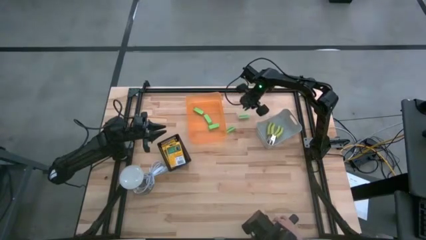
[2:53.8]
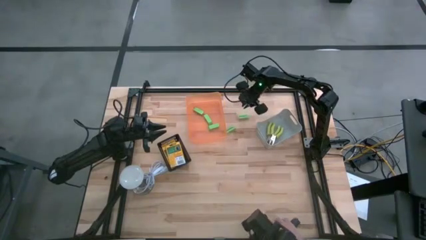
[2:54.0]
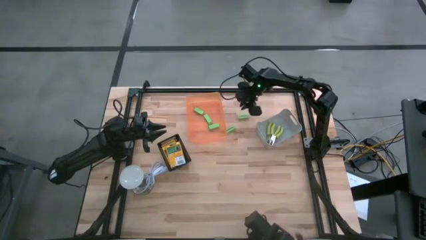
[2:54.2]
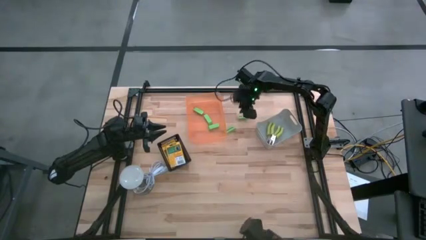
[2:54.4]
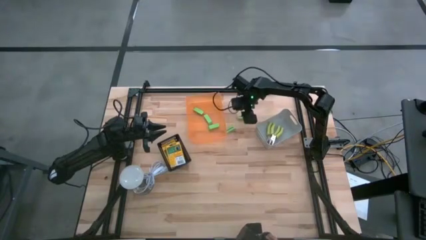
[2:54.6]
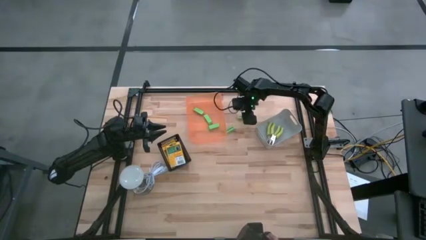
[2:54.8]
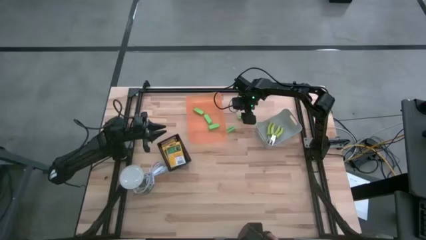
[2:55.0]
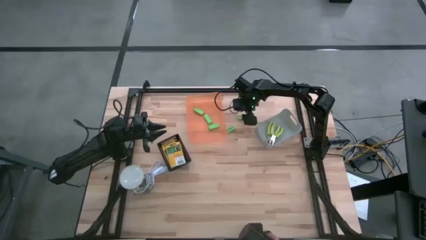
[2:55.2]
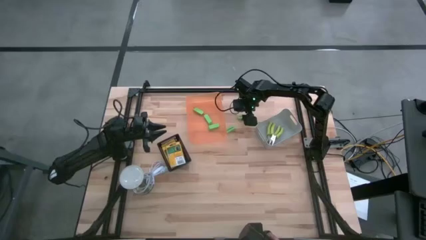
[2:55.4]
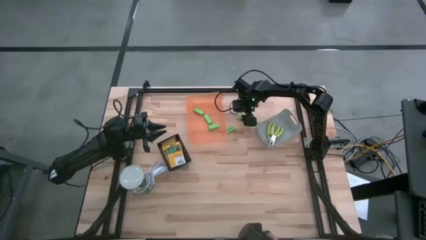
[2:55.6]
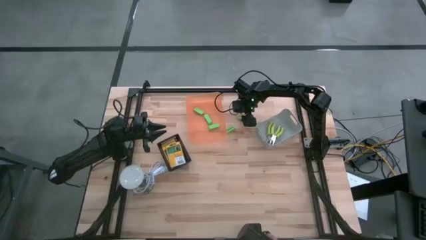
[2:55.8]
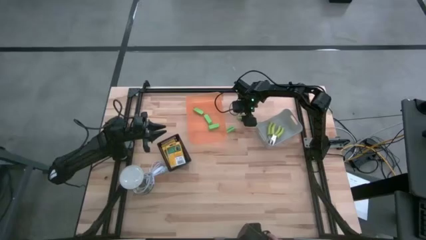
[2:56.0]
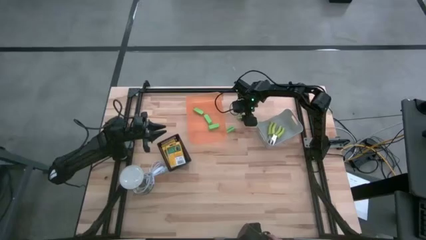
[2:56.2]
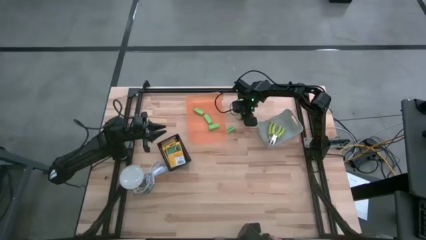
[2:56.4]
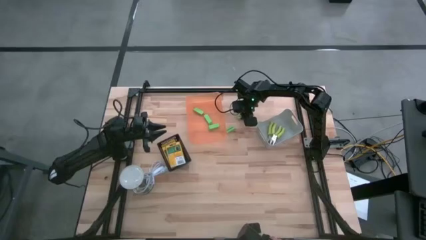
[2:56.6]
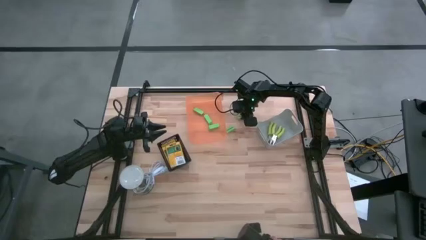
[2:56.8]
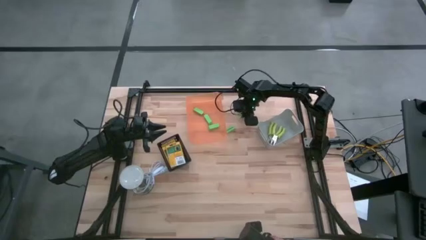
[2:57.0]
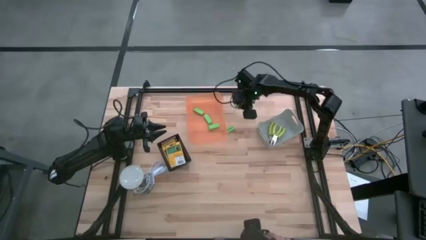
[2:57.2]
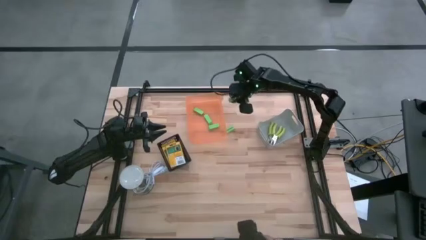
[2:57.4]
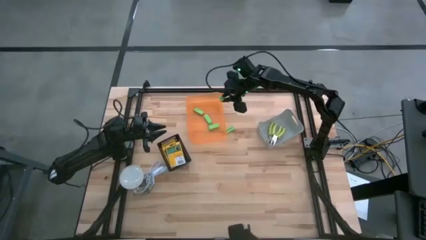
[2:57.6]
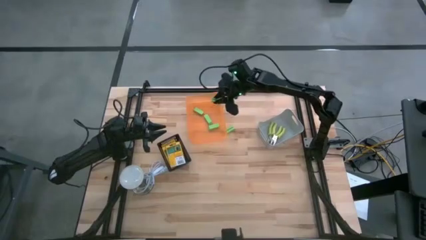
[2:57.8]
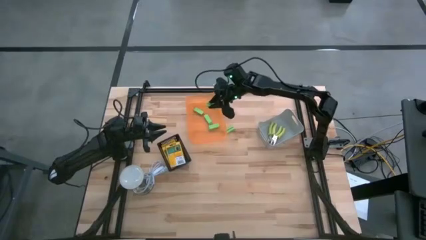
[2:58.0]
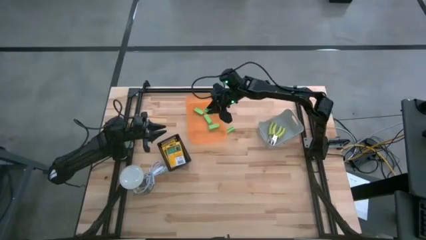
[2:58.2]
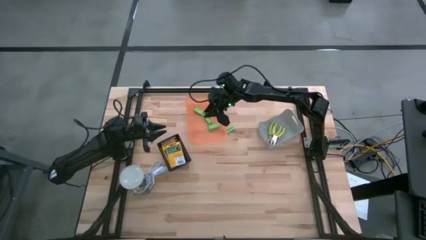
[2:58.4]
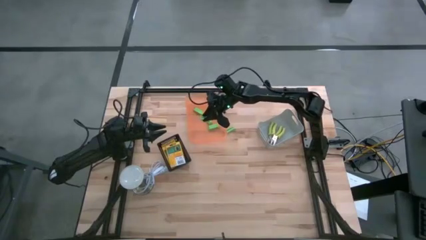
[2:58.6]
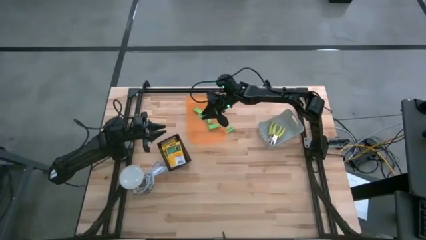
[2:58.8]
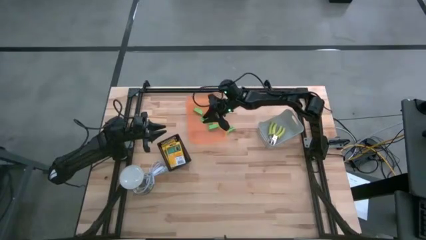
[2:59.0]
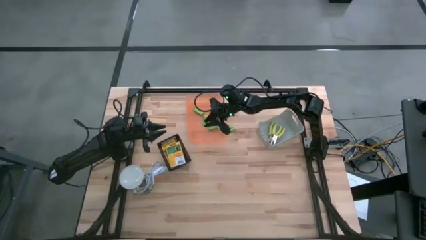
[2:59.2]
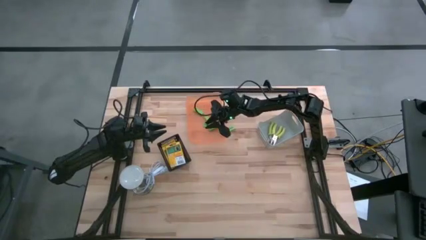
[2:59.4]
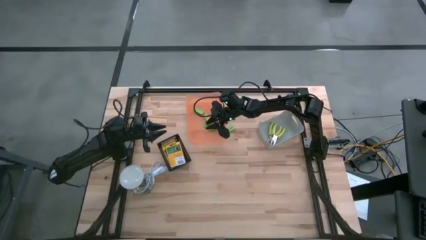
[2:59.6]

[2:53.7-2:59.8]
Task: Pick & Place School Supplies
Put the green eraser into the orange bin

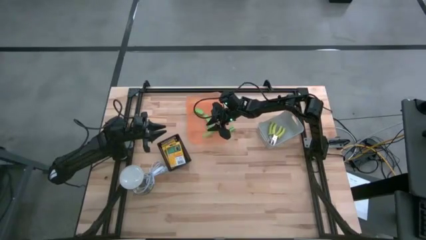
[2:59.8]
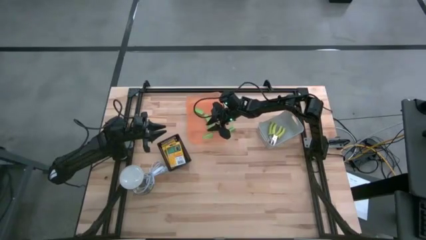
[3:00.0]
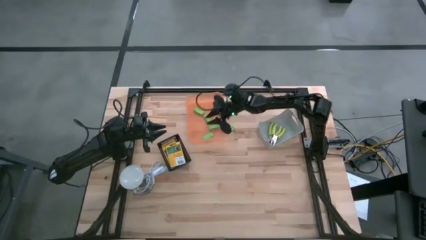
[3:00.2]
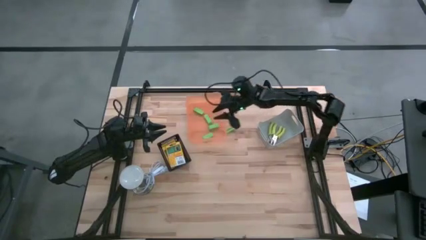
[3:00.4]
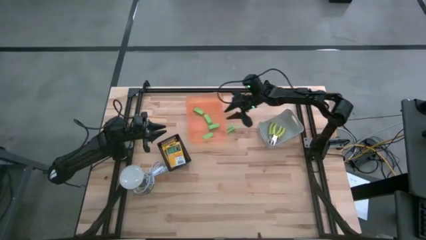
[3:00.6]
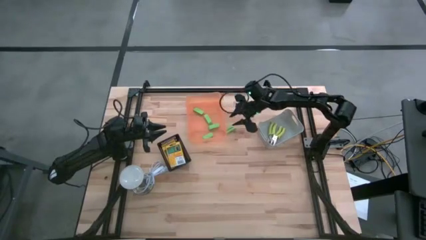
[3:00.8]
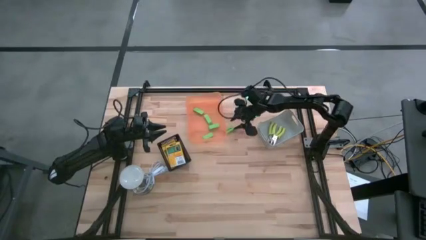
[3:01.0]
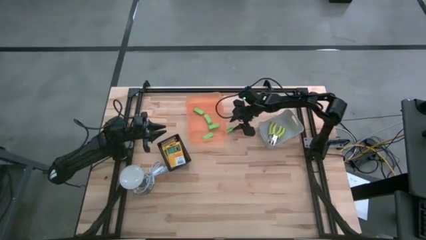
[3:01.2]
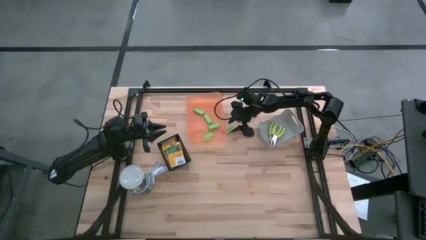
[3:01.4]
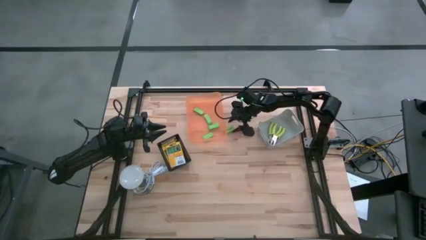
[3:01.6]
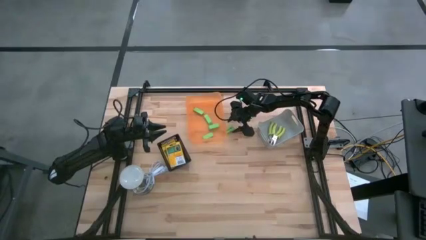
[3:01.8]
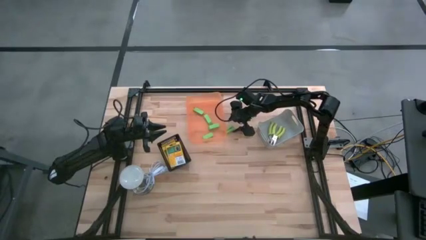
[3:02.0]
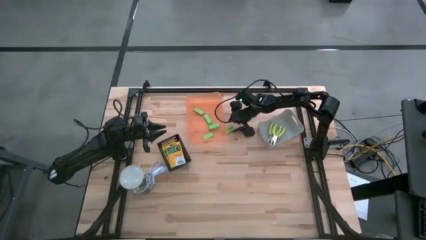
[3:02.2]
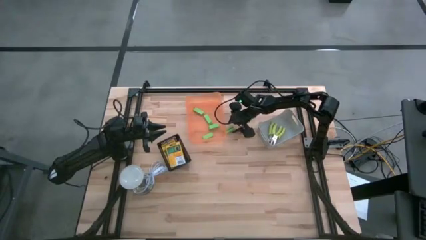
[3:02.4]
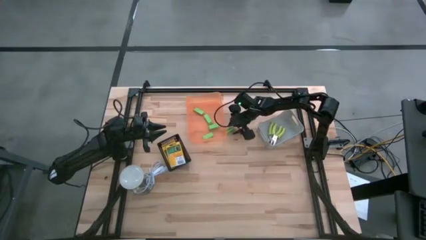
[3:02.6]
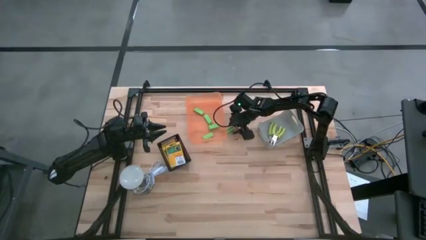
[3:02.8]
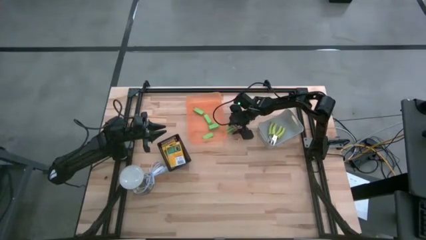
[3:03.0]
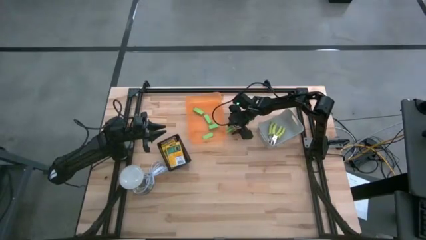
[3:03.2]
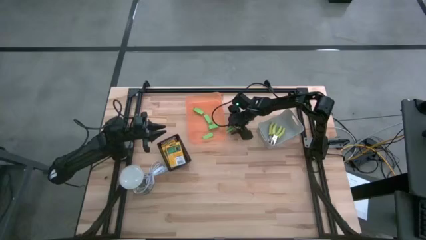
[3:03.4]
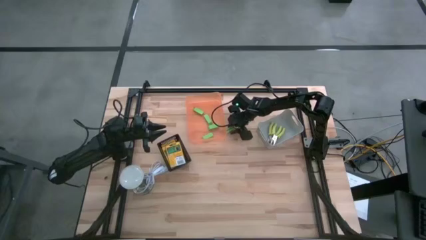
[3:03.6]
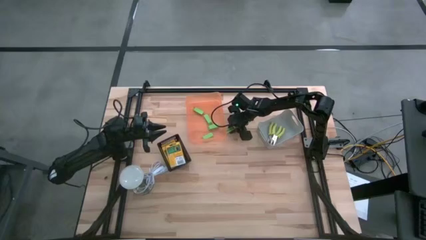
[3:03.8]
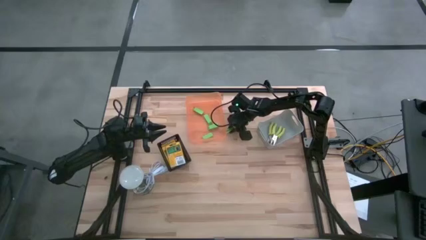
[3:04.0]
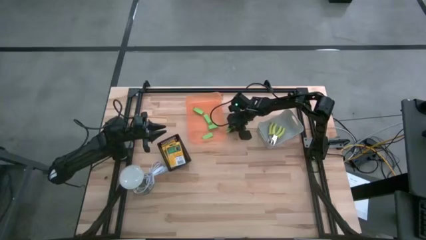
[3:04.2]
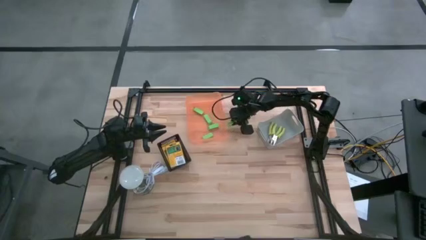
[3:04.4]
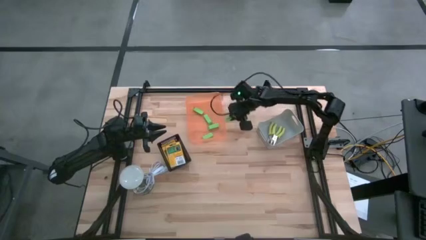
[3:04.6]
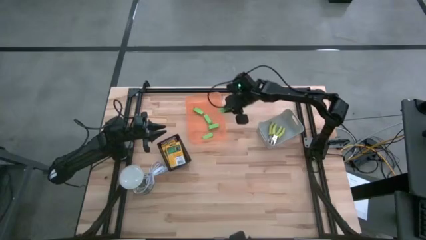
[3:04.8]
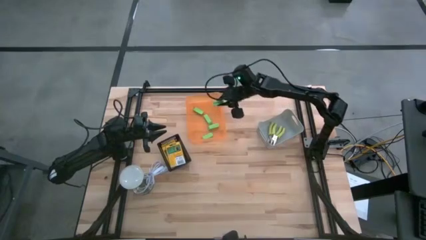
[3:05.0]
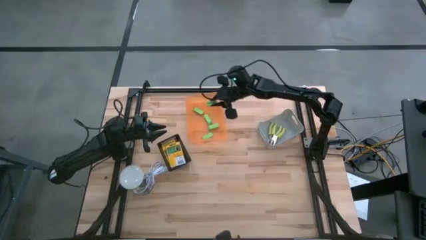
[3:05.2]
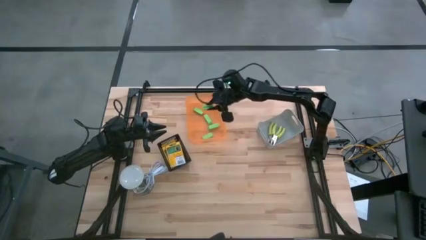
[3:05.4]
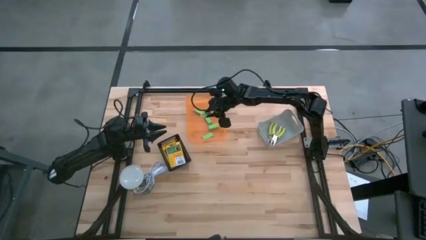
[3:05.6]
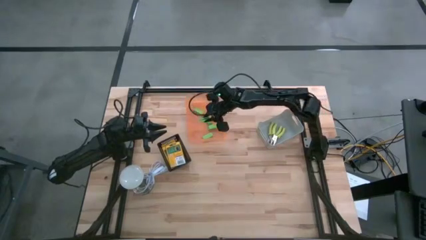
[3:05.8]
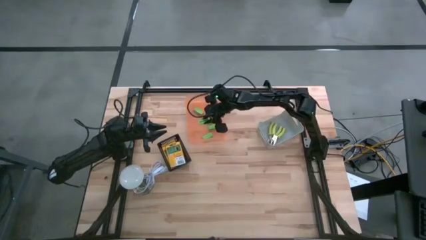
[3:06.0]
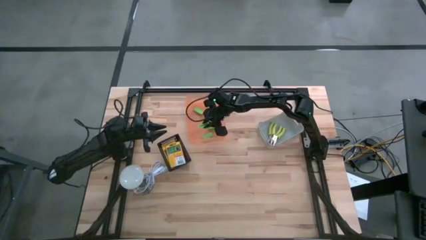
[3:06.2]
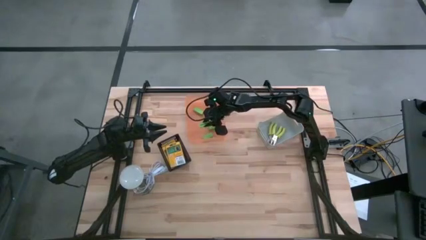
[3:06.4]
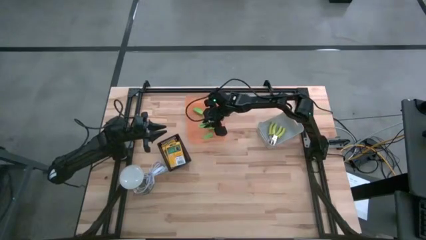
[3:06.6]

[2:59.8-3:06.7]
Put the green eraser into the orange bin

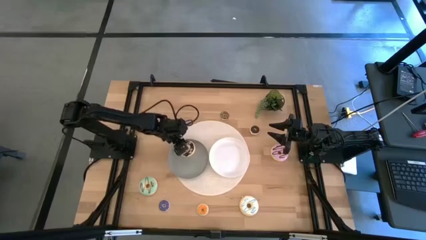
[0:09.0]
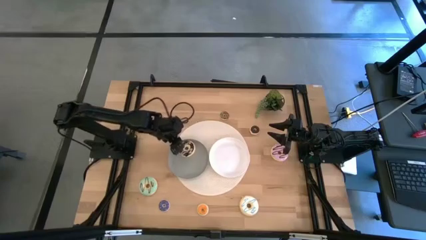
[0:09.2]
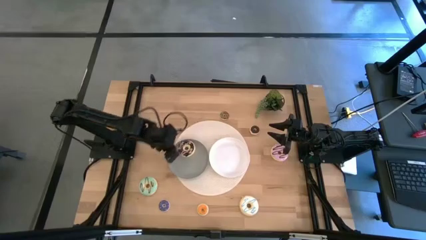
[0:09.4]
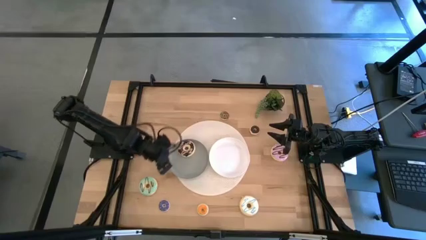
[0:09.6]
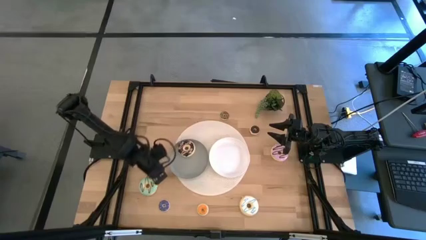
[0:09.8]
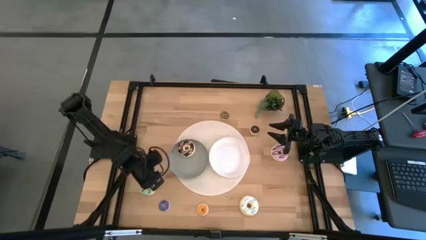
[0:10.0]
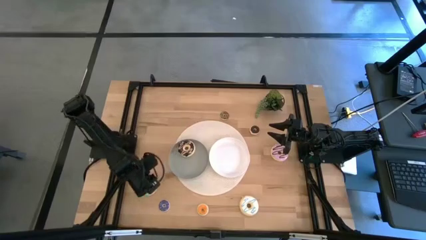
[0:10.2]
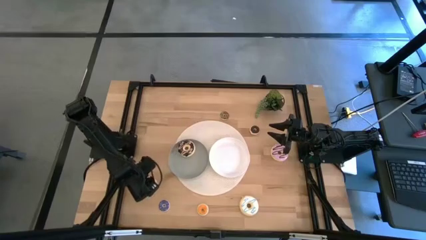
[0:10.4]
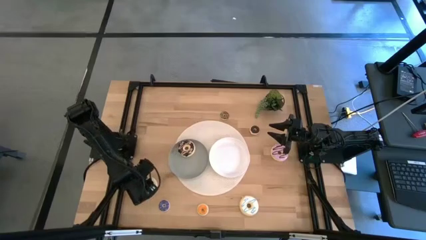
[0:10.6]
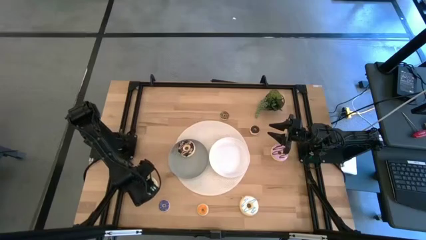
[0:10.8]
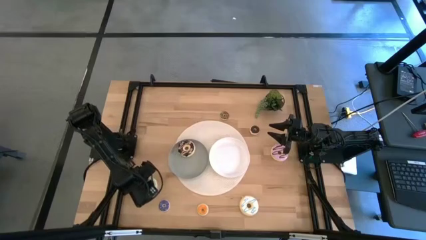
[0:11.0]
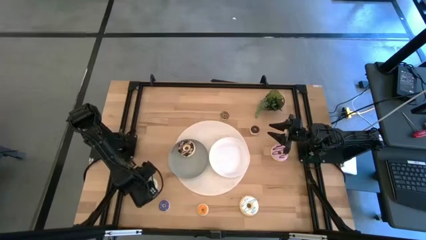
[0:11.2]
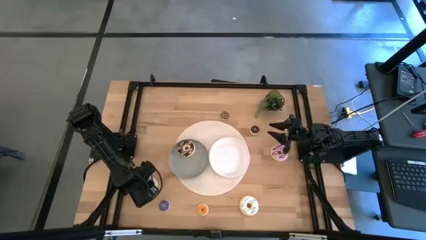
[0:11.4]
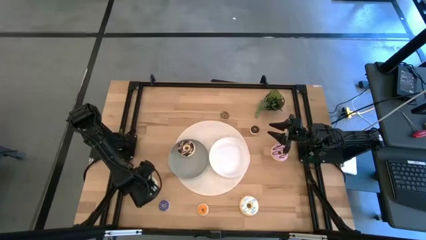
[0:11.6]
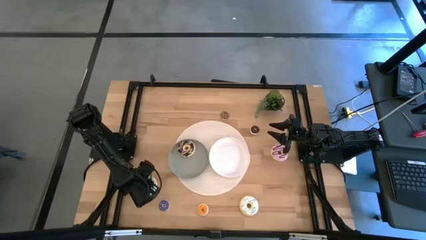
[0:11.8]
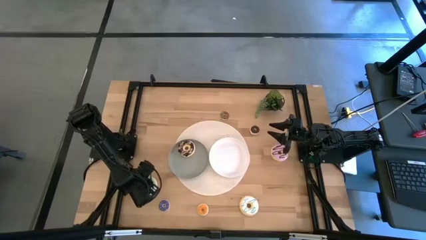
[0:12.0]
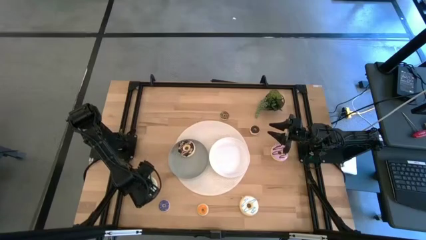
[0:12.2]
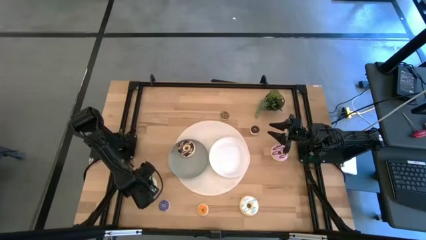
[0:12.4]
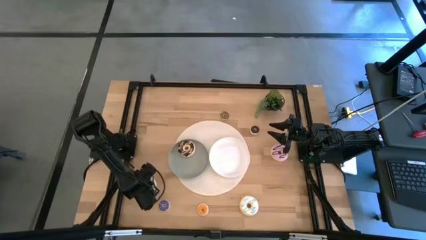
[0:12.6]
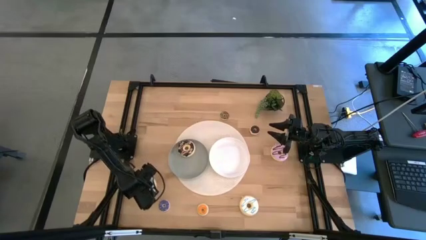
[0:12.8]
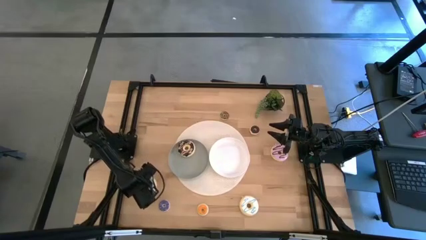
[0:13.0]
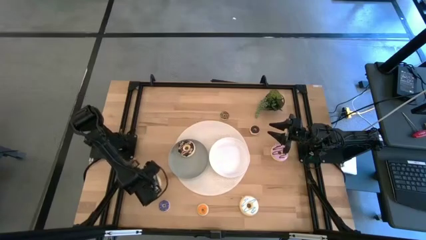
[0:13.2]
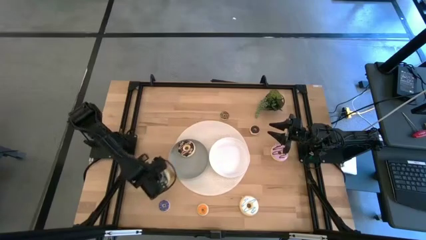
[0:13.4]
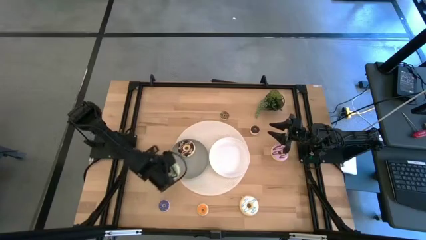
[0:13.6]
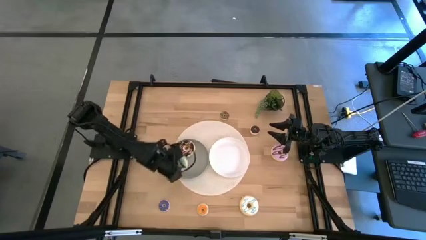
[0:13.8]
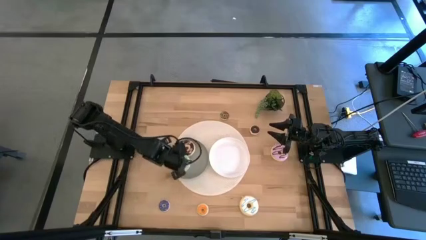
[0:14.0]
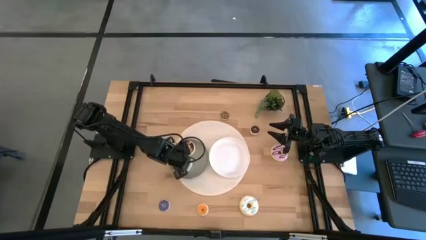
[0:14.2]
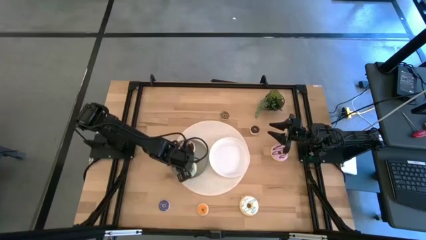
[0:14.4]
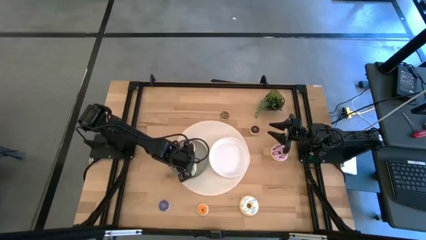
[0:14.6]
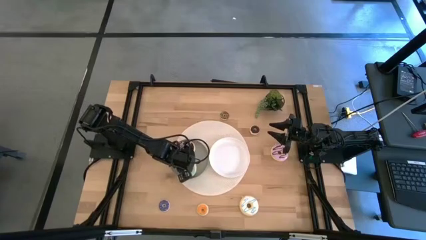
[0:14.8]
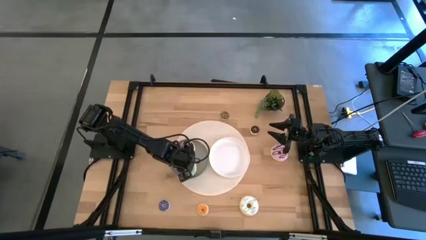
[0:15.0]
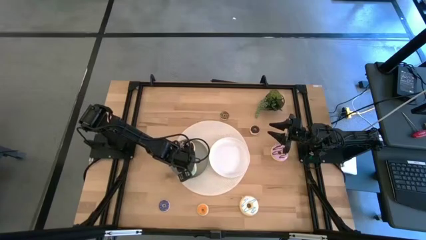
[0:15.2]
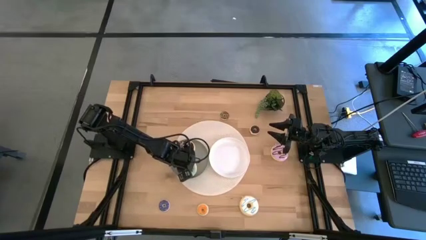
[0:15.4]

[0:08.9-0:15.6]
Task: Pick & Place donuts
Put the large blue donut on the gray plate
